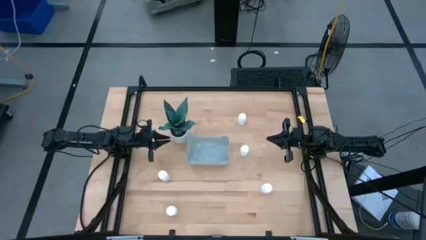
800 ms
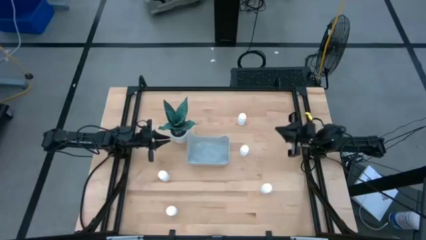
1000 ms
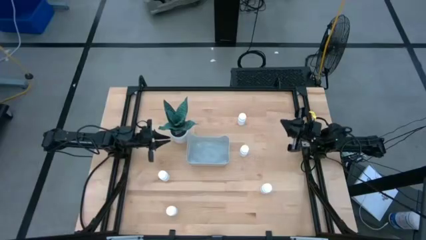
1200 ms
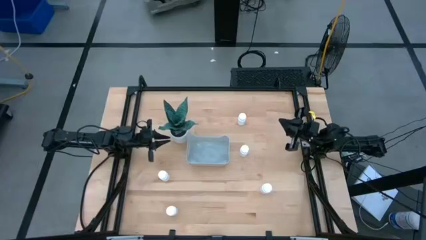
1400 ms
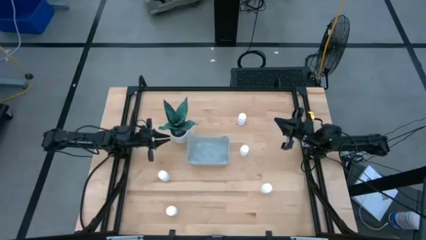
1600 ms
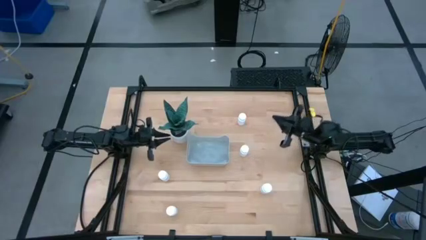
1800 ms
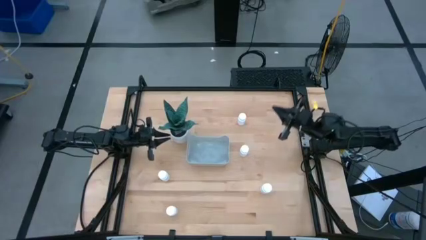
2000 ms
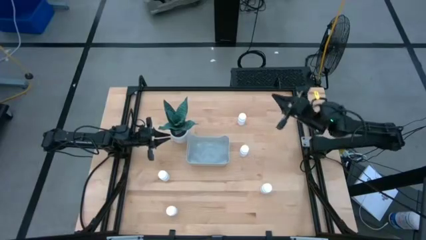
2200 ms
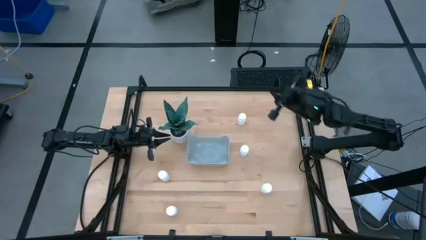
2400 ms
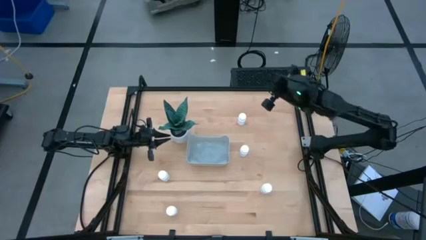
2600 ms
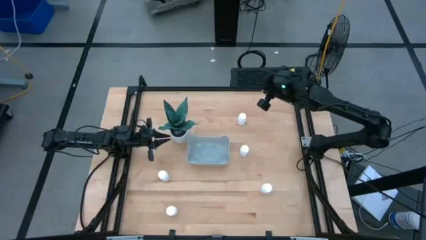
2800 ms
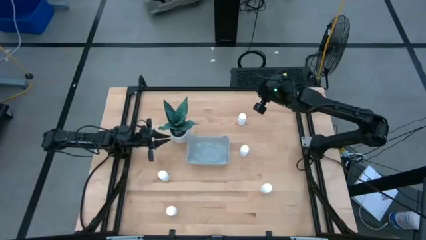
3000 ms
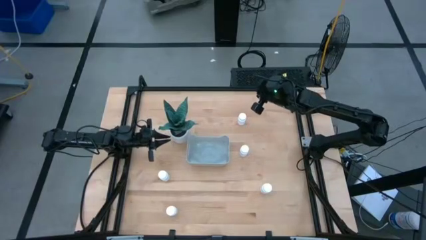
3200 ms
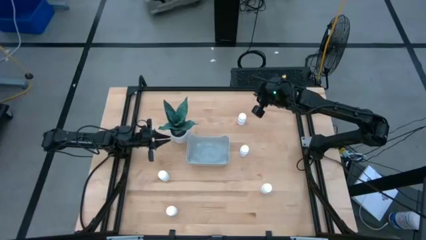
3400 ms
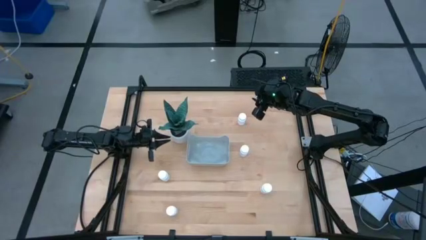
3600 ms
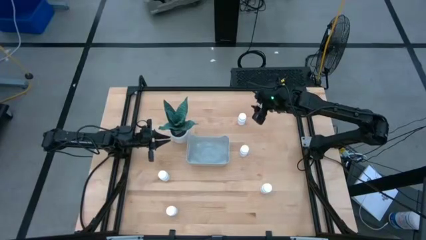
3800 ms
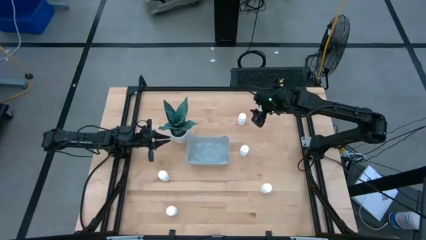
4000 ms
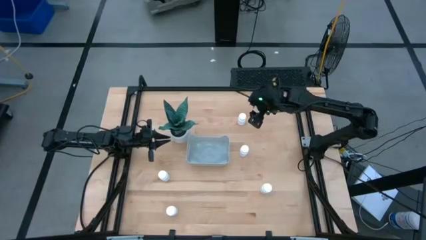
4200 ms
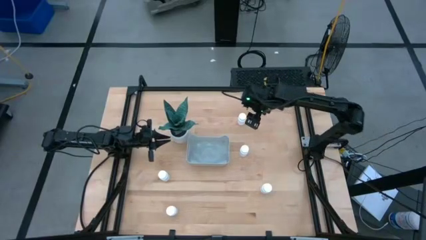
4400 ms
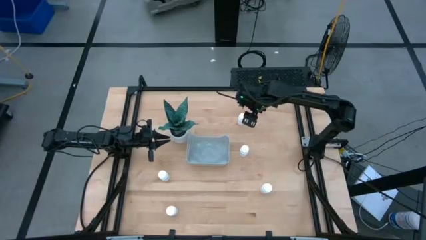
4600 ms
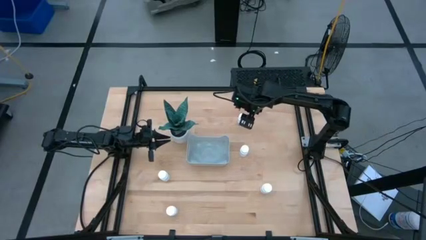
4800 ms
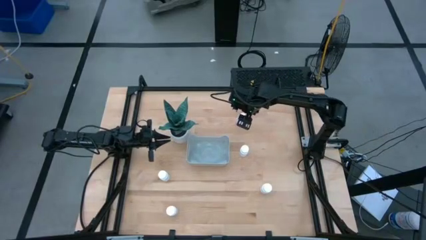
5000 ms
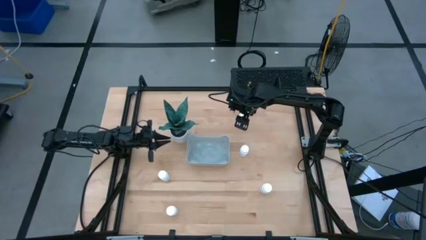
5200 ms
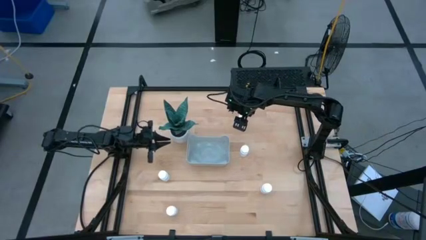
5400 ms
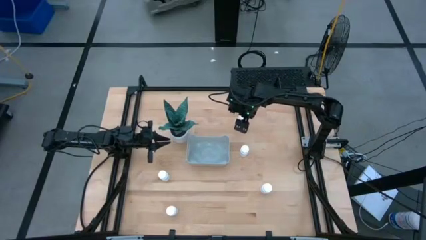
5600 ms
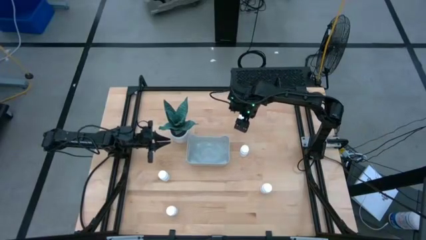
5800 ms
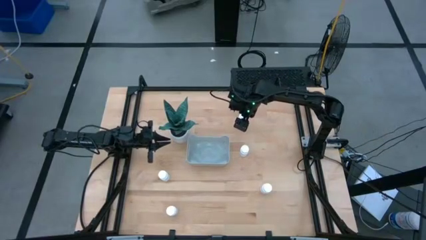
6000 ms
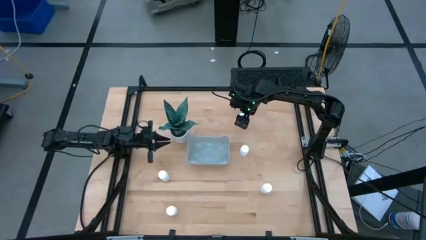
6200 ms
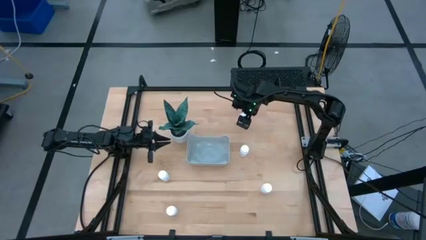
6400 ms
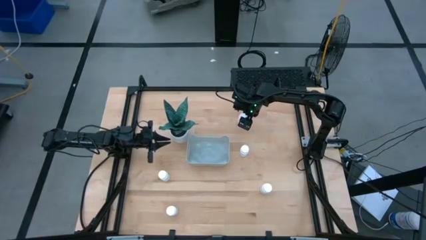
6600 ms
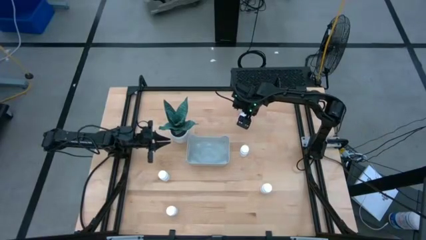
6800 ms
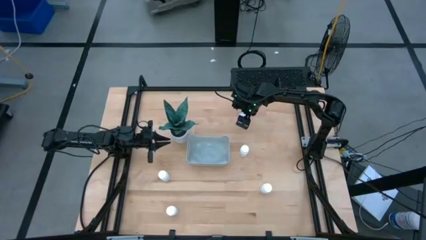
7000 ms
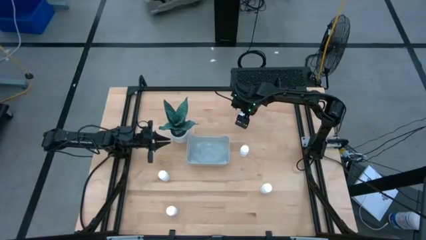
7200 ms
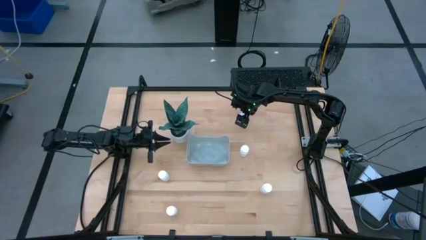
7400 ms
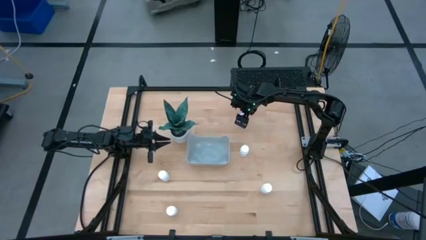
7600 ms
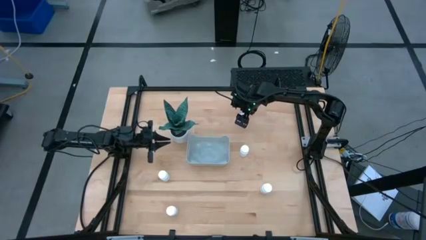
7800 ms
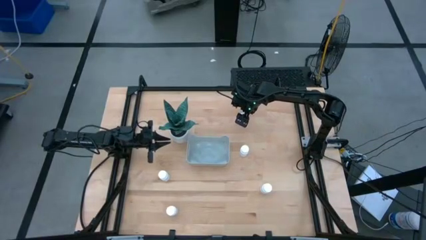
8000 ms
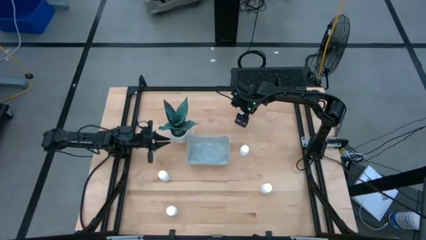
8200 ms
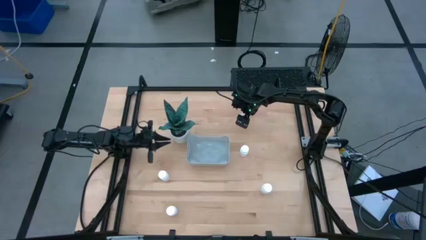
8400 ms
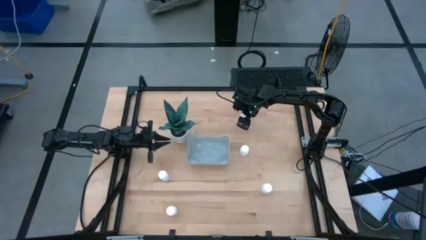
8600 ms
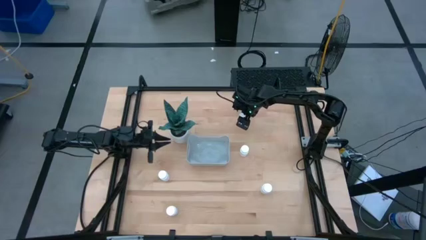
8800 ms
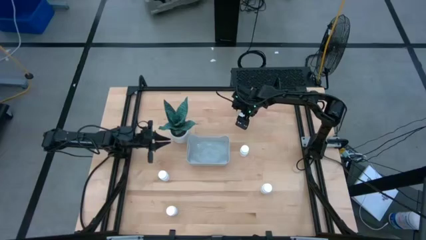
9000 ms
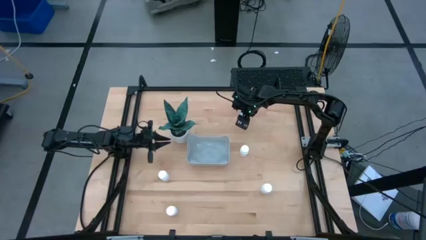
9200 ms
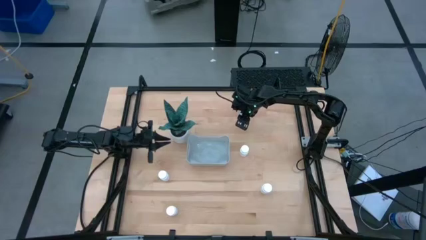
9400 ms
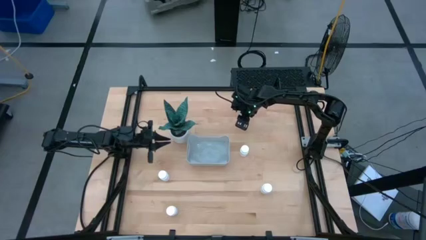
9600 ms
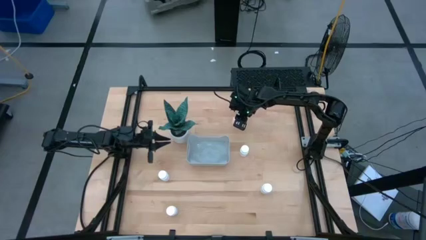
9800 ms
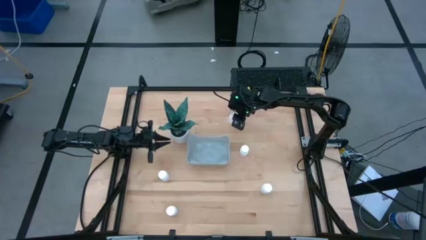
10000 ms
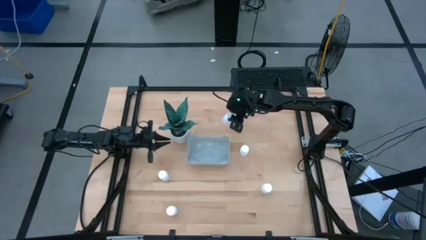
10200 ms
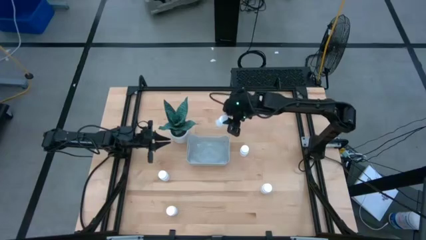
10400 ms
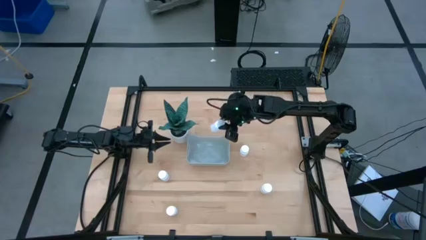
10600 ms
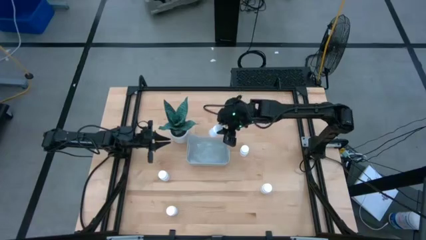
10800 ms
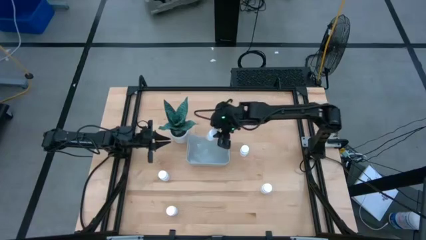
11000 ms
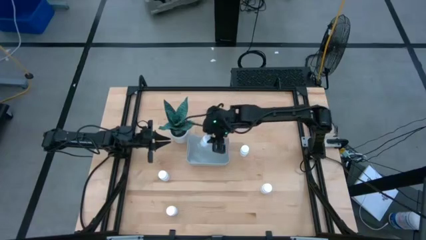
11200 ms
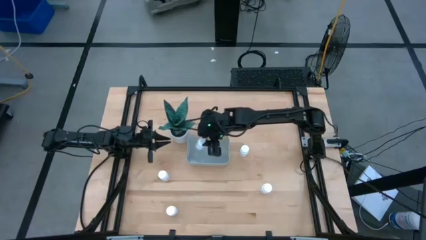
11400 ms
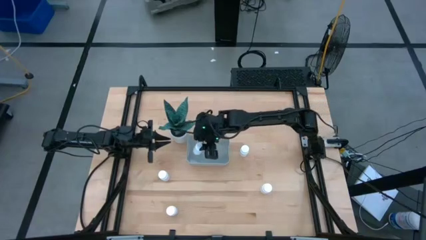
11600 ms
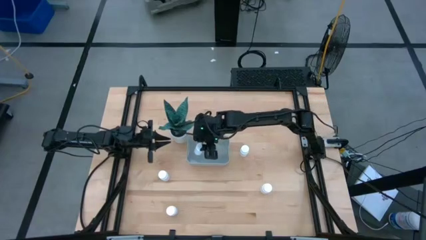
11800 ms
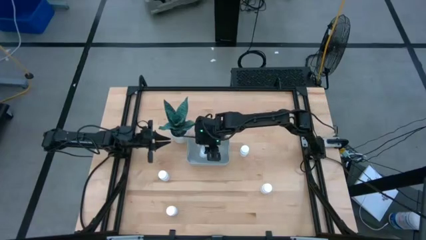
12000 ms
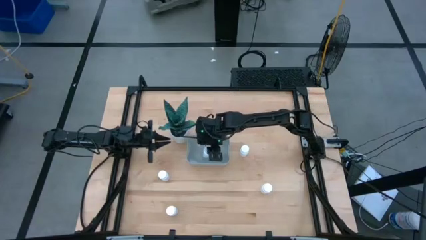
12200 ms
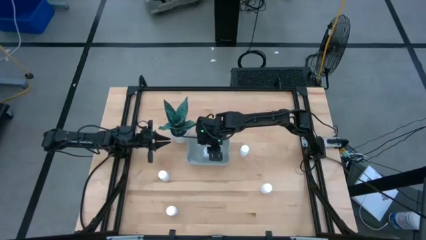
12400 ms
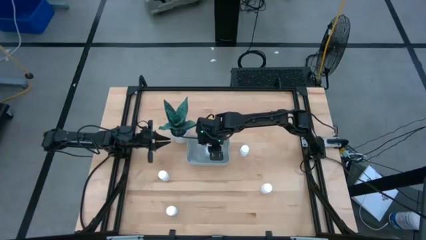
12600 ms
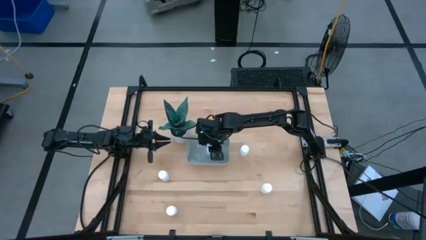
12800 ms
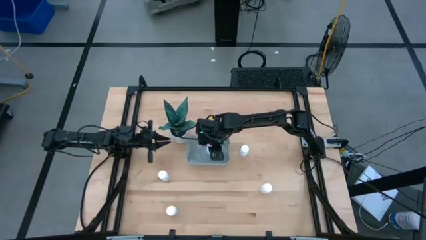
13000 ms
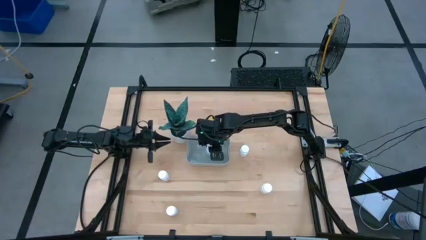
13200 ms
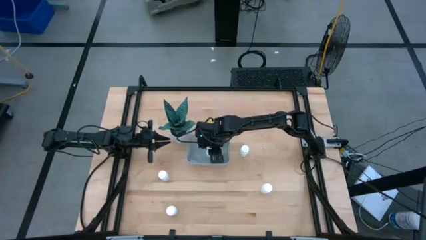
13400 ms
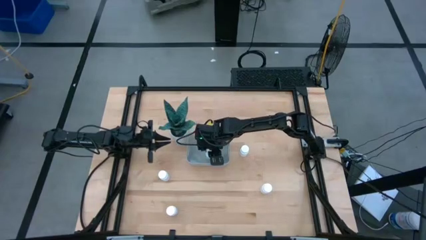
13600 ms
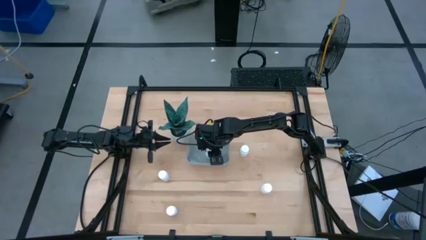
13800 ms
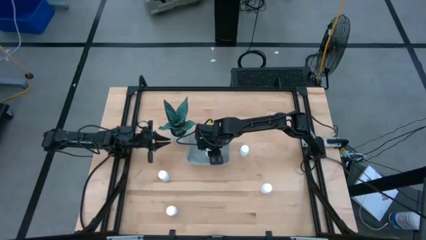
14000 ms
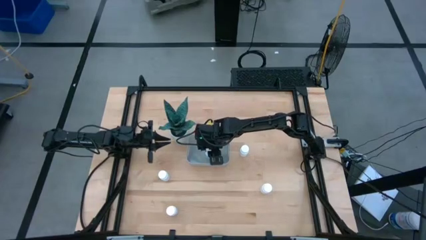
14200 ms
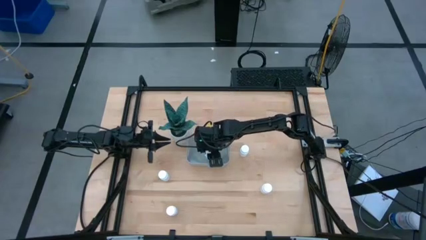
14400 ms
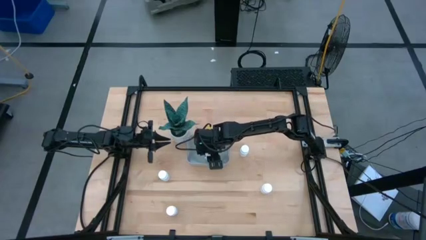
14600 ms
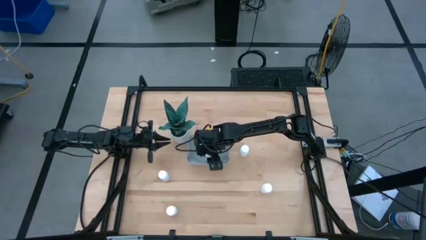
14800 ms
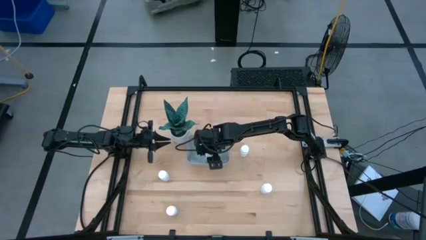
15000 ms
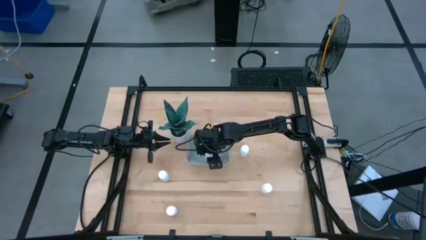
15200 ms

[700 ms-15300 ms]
Task: Pick and place pill bottles into a basket
Put the white pill bottle into the gray bin
